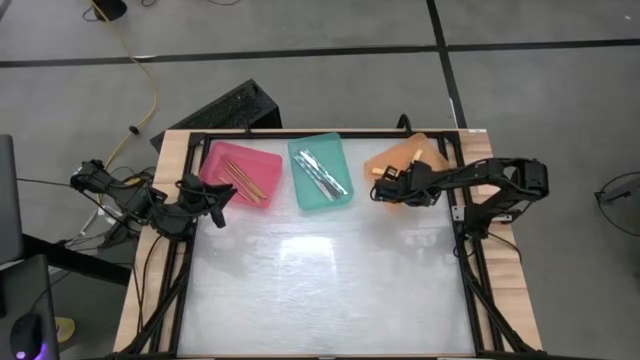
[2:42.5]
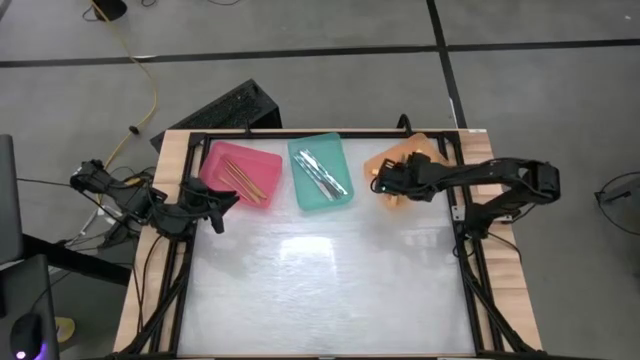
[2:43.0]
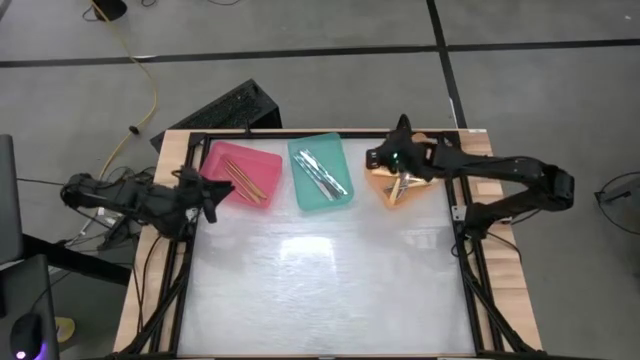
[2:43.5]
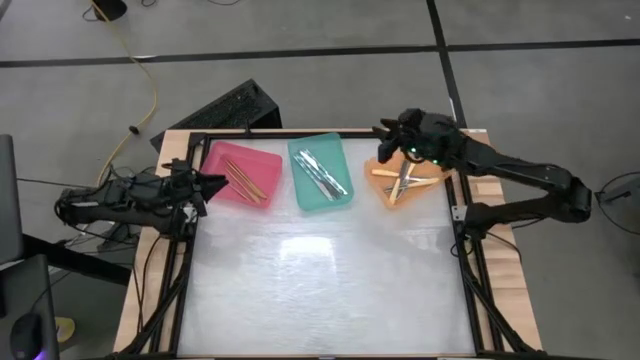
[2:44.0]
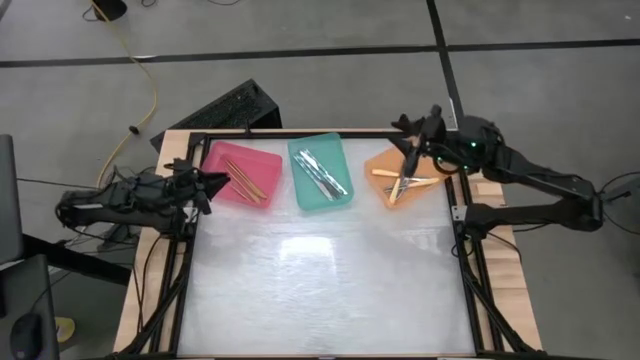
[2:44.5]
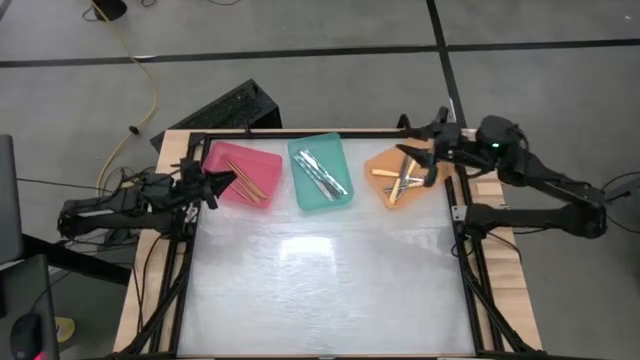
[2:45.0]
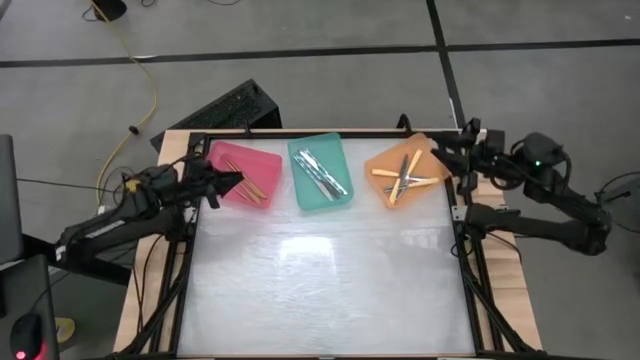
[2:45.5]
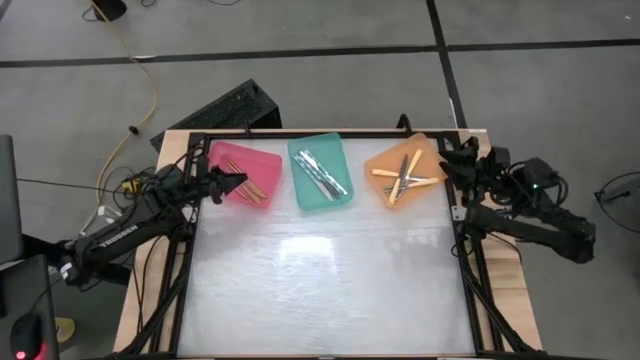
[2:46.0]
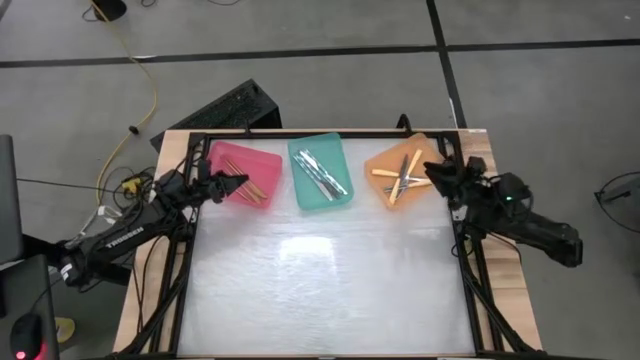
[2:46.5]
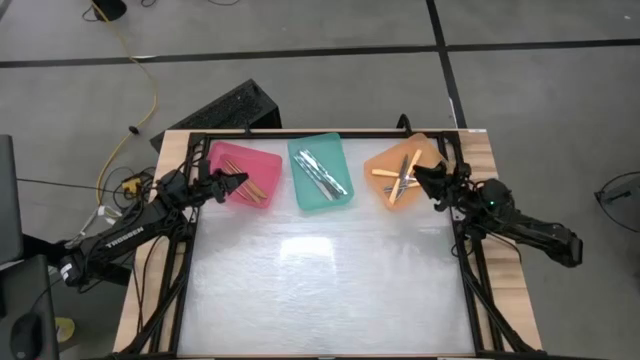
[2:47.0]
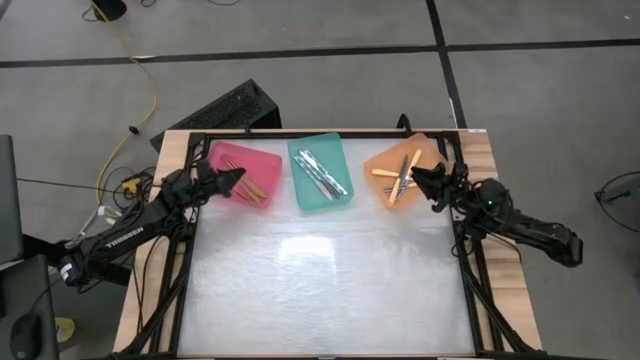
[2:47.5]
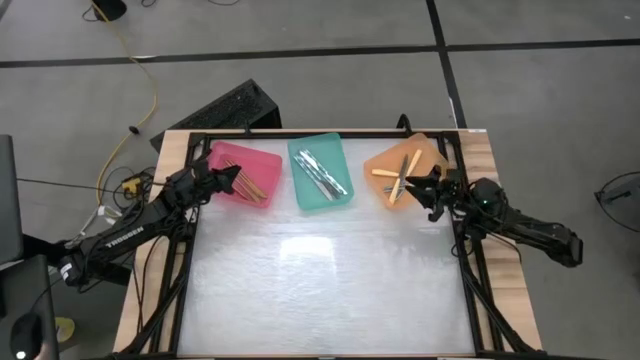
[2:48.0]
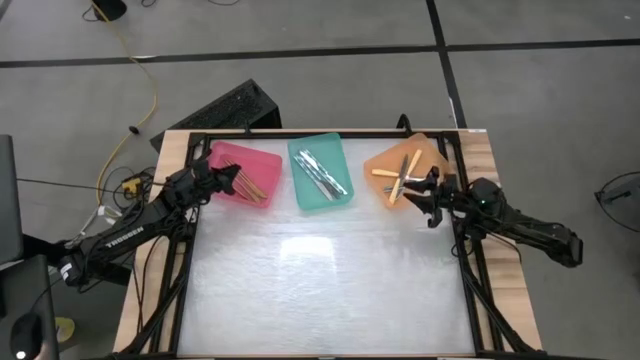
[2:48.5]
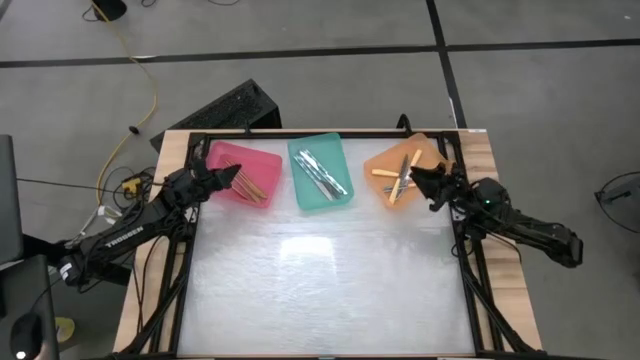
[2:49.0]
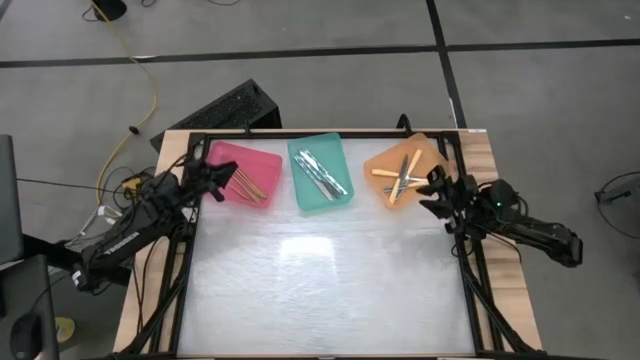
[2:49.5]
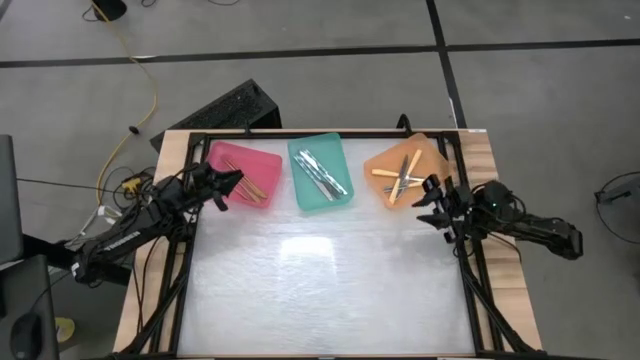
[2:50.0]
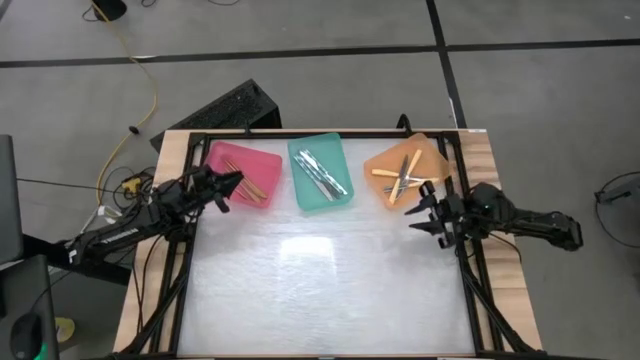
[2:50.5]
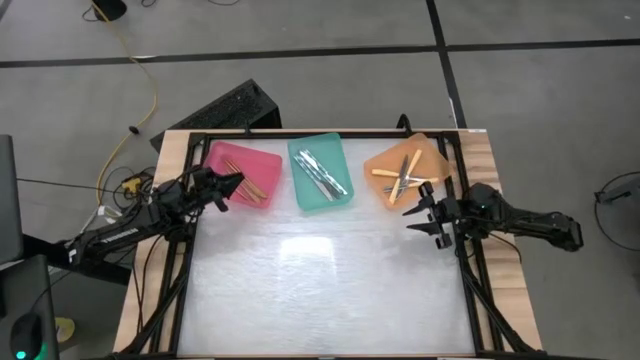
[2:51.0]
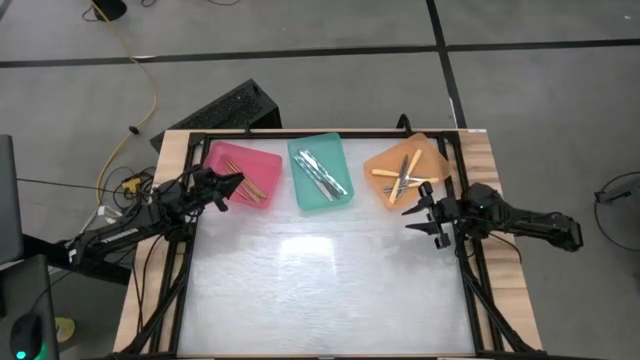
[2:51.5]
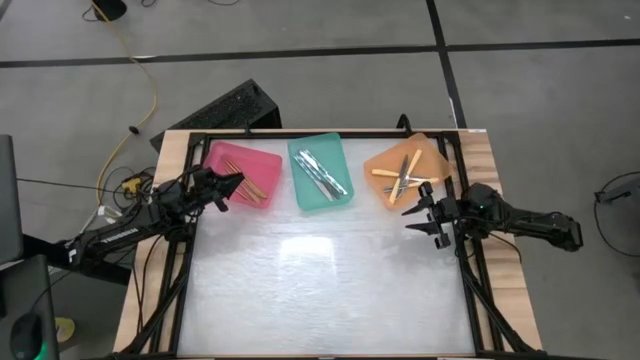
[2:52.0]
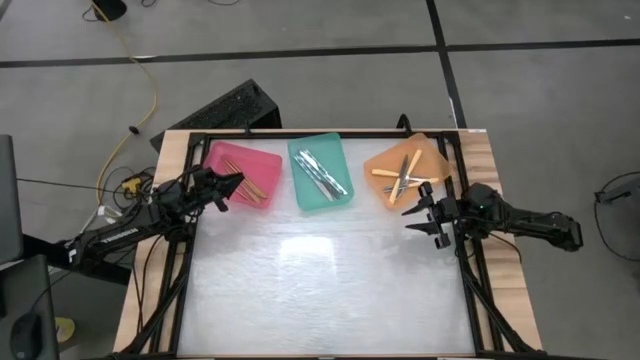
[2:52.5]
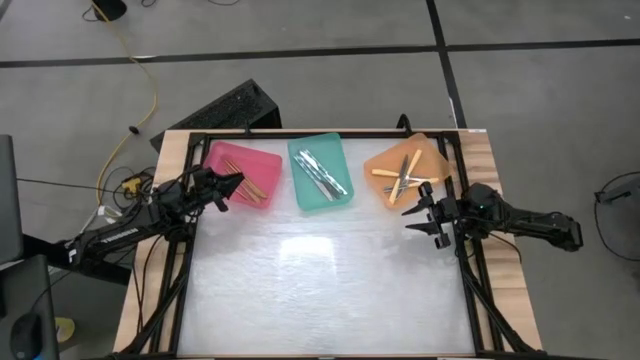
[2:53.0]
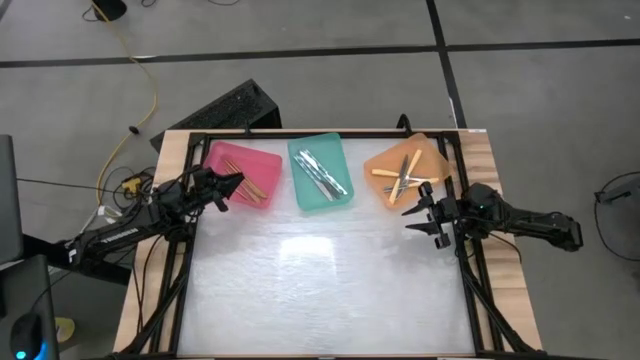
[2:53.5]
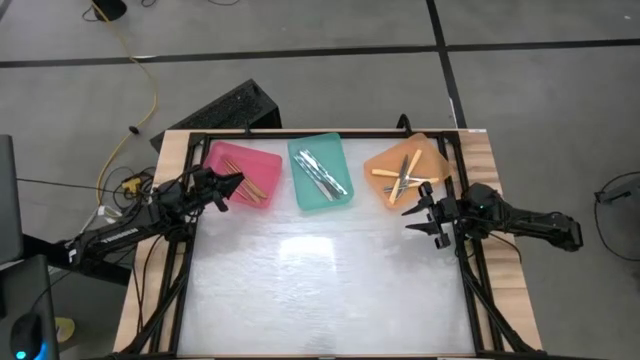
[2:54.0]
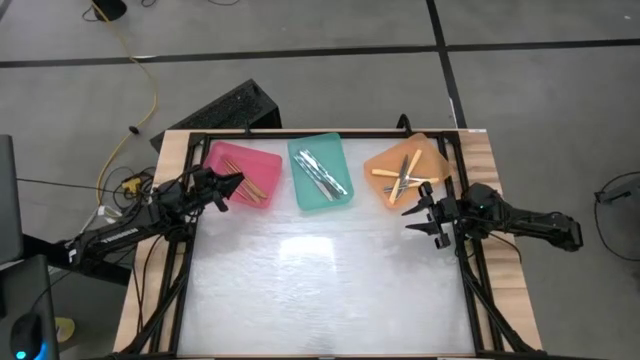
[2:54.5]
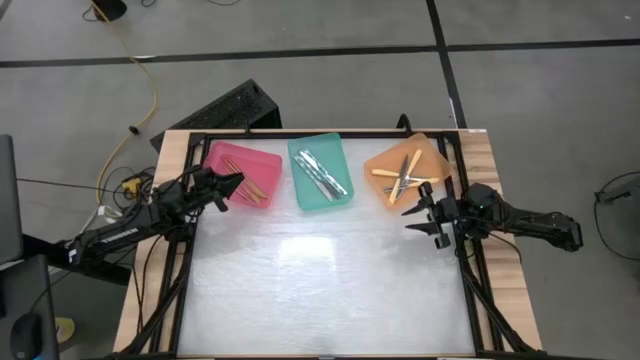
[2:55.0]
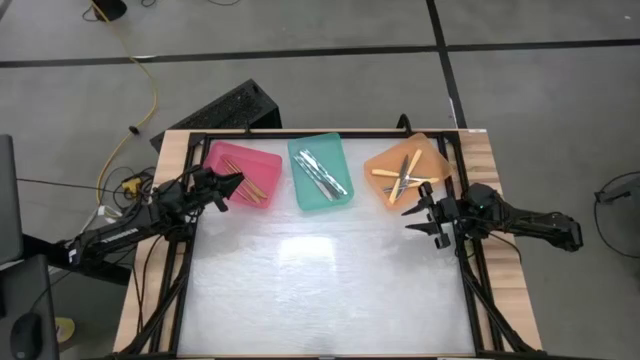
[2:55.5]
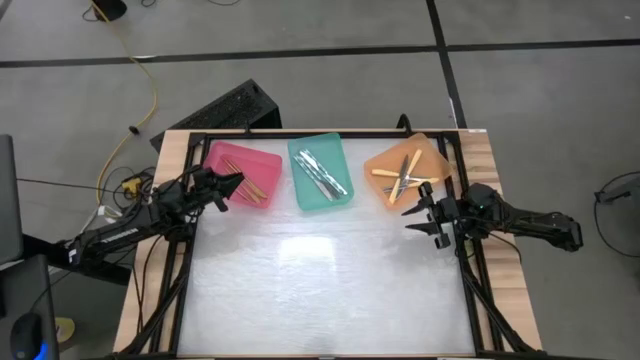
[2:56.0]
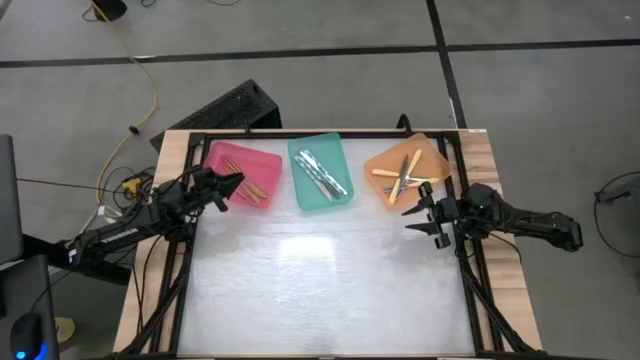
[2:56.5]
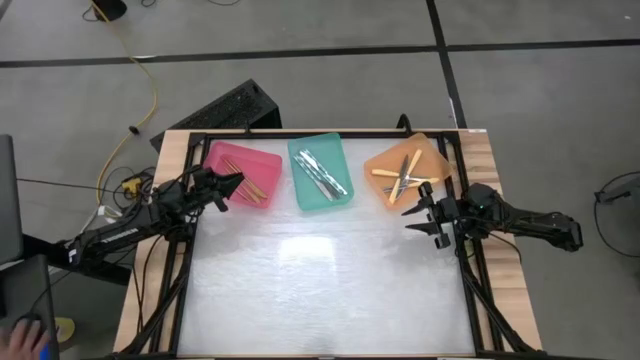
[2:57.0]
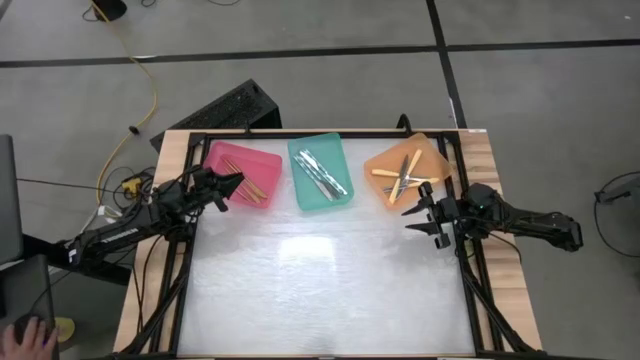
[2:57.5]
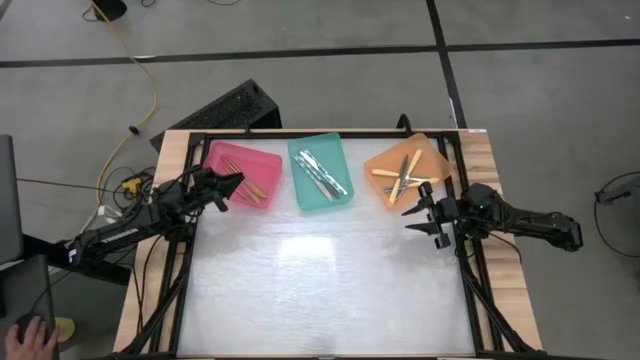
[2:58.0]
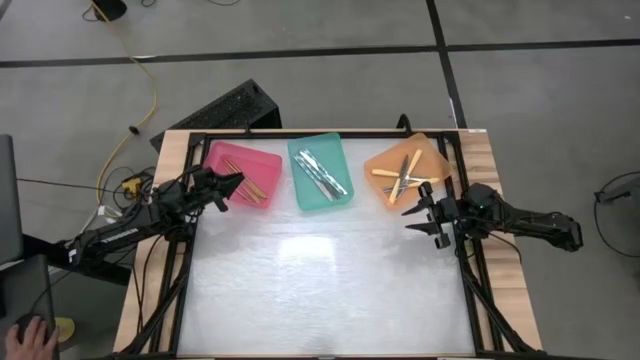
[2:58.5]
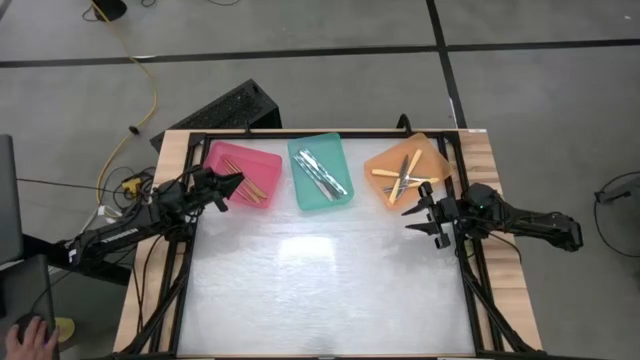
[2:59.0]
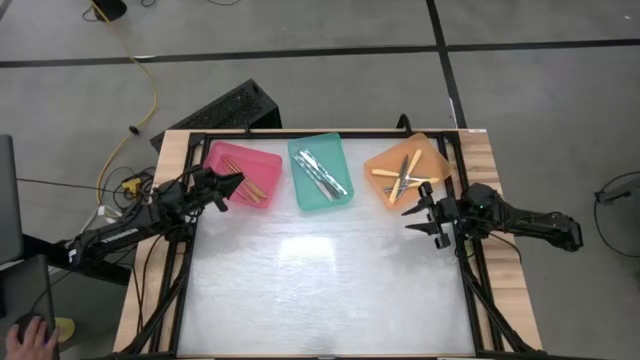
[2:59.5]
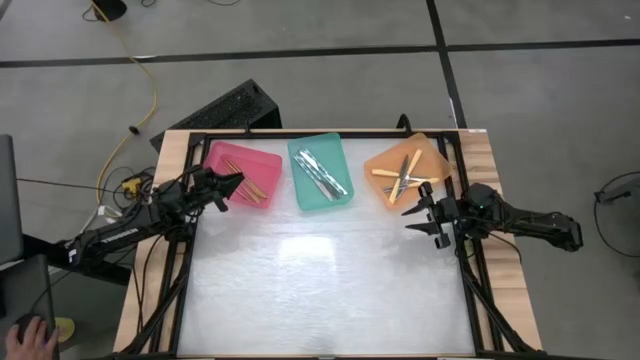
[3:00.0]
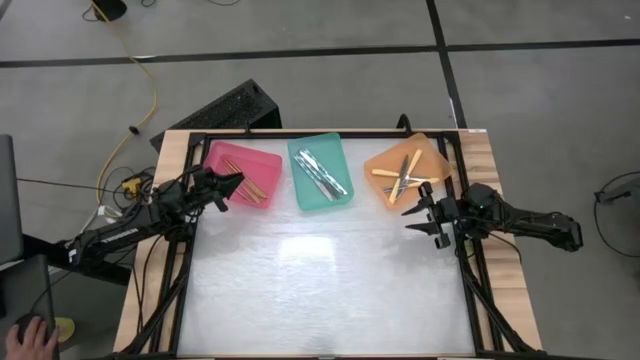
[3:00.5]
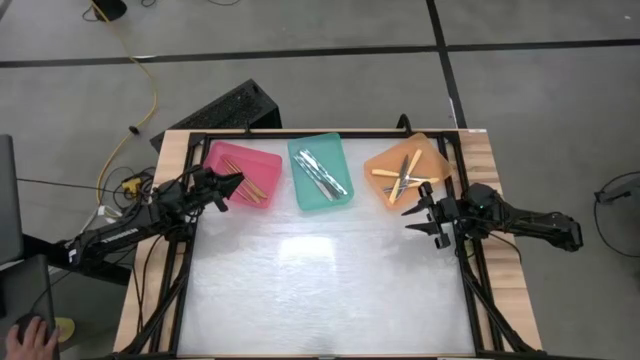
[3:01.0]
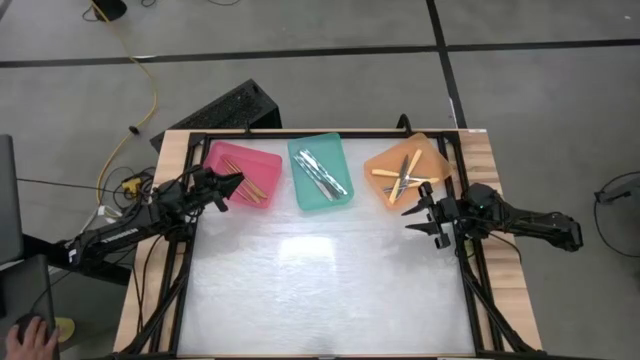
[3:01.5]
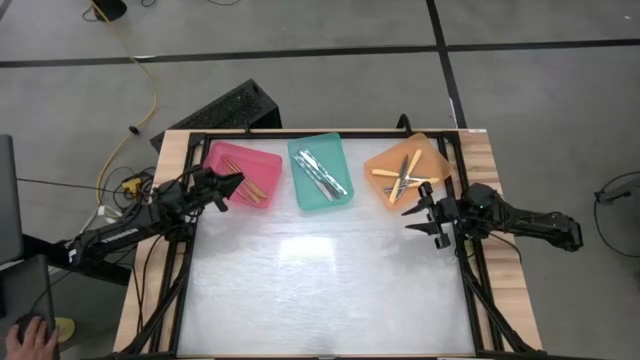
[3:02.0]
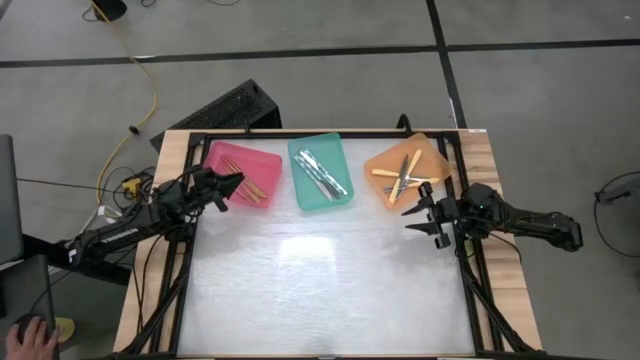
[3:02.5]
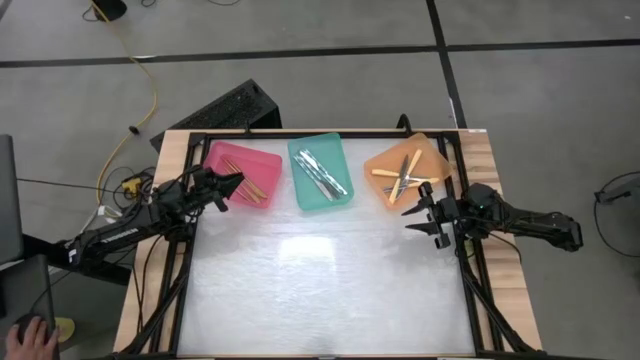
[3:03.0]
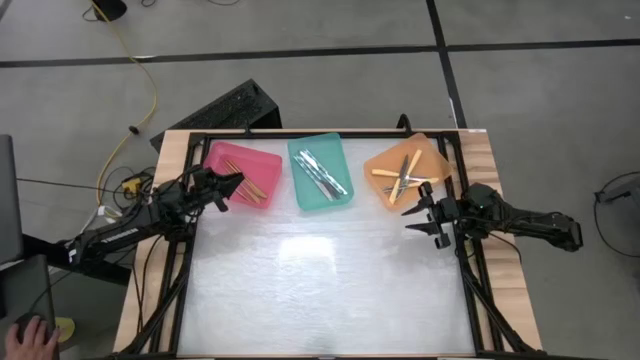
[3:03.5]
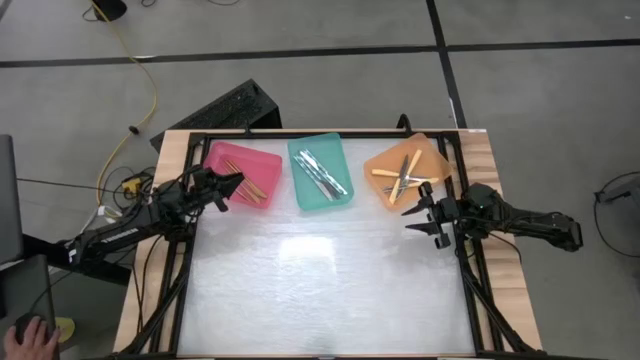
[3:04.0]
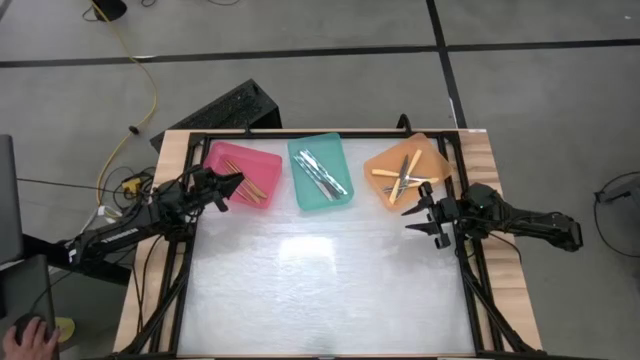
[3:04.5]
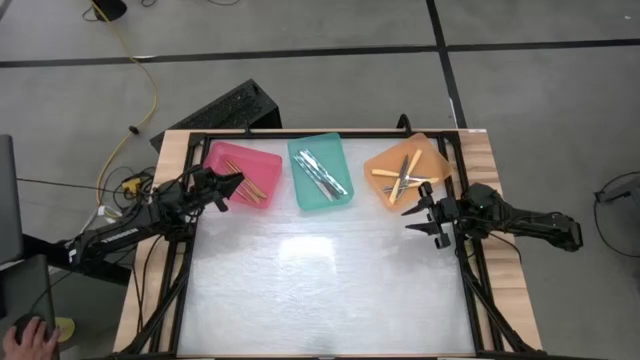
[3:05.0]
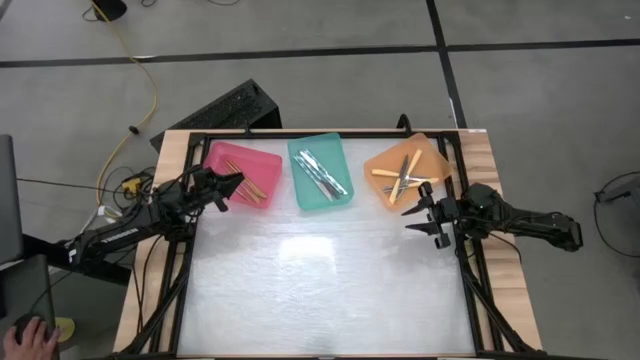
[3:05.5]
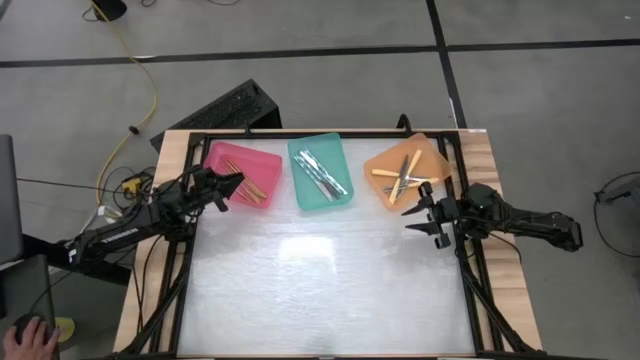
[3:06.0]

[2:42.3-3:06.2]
Task: Sort silverware by color (type)
Return to Home Position
